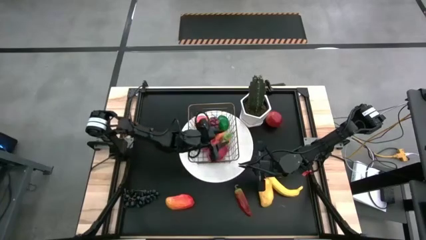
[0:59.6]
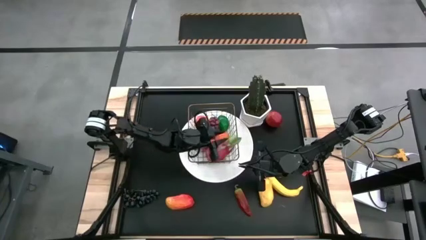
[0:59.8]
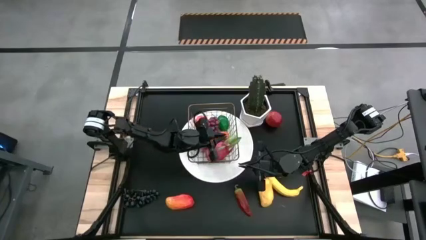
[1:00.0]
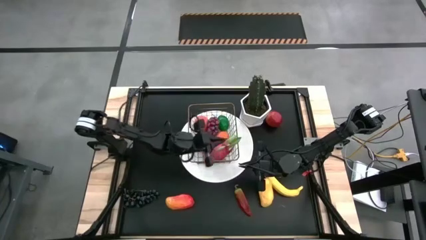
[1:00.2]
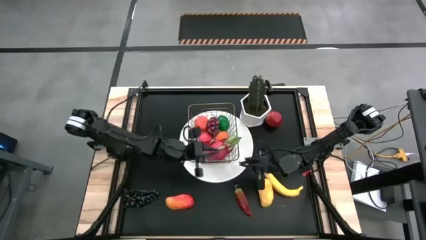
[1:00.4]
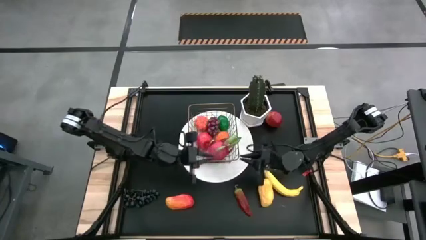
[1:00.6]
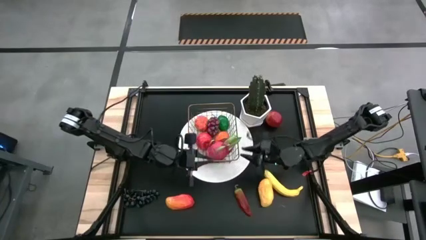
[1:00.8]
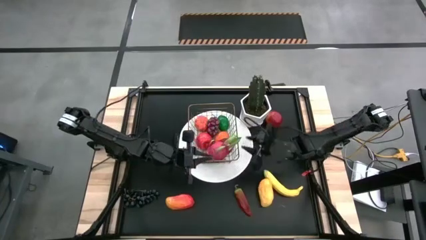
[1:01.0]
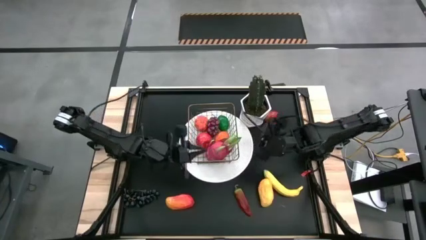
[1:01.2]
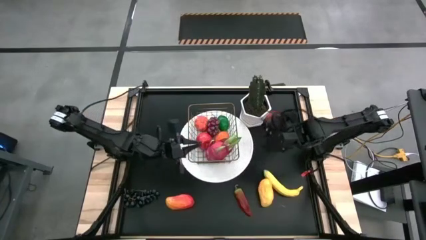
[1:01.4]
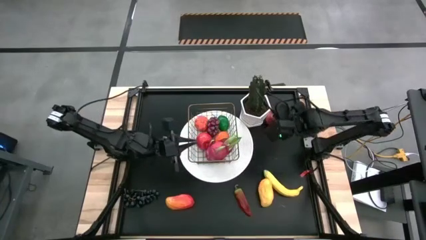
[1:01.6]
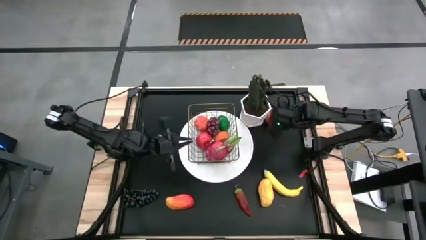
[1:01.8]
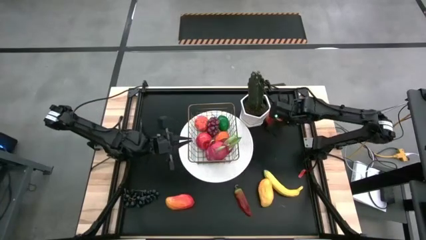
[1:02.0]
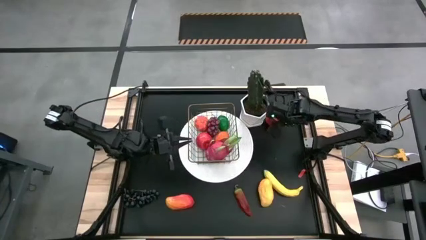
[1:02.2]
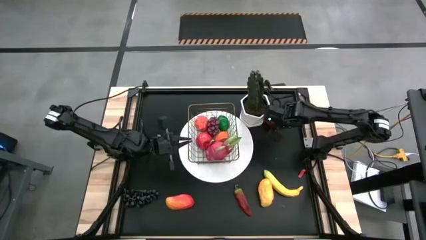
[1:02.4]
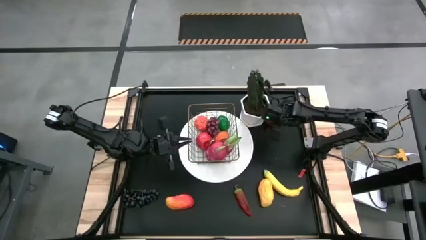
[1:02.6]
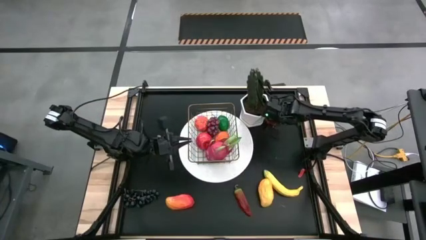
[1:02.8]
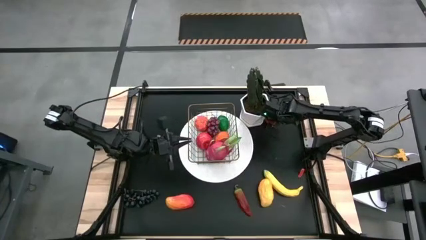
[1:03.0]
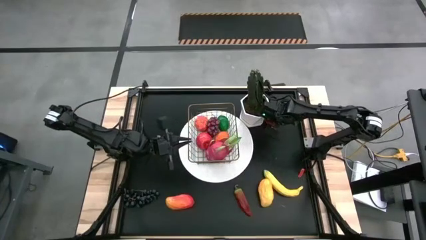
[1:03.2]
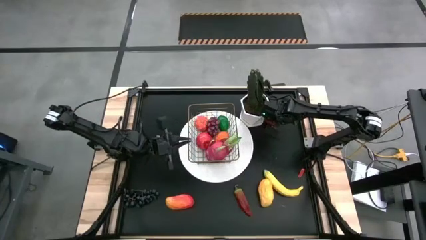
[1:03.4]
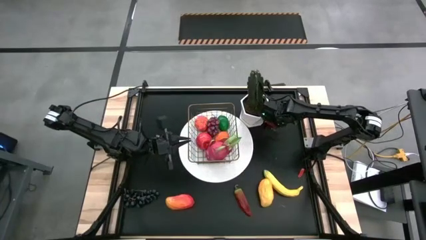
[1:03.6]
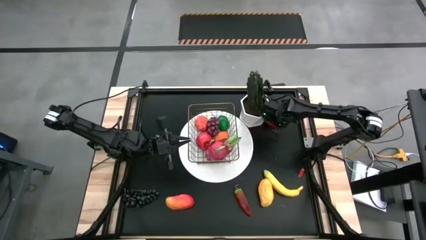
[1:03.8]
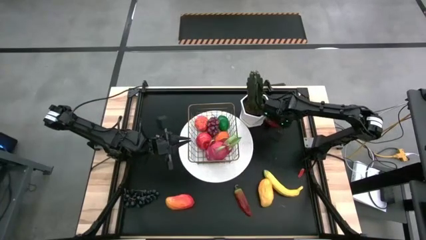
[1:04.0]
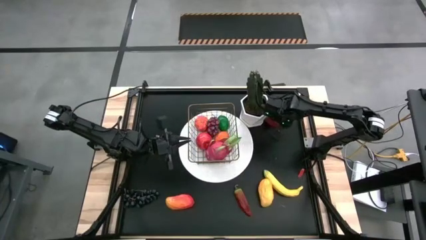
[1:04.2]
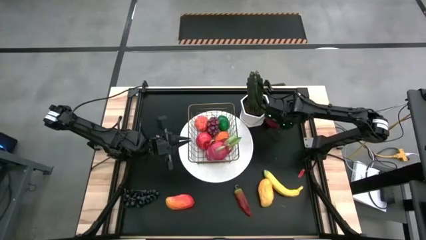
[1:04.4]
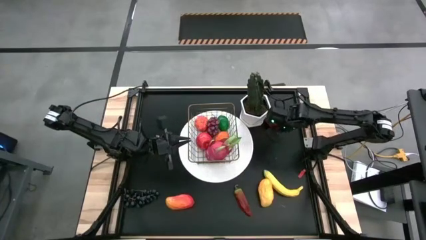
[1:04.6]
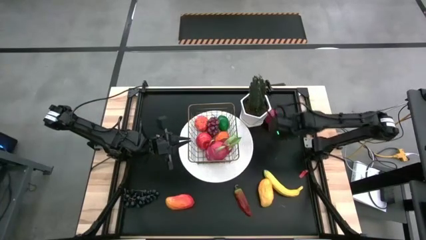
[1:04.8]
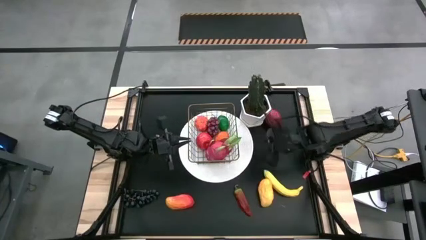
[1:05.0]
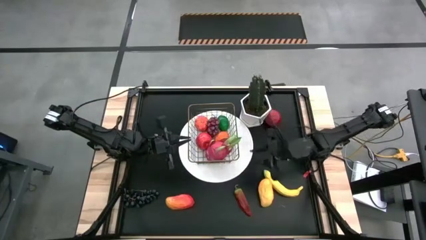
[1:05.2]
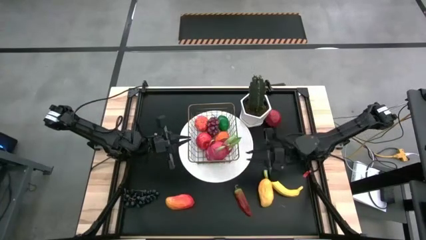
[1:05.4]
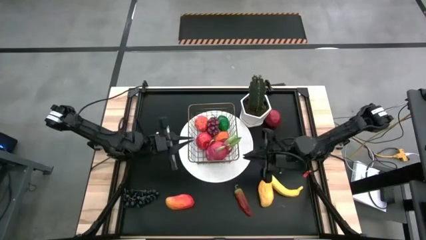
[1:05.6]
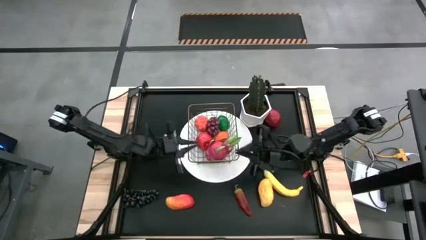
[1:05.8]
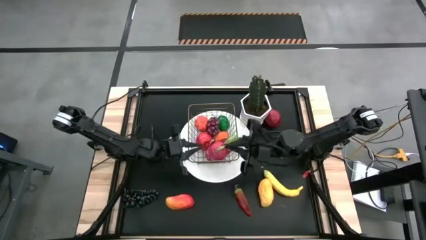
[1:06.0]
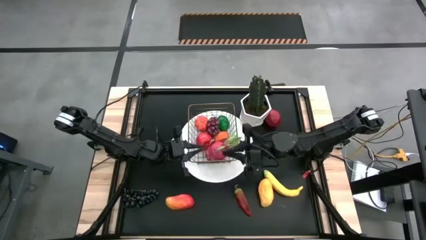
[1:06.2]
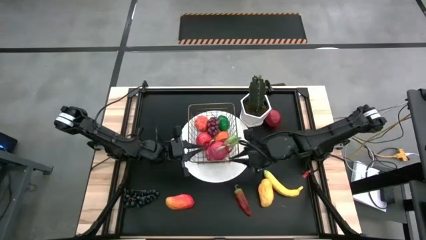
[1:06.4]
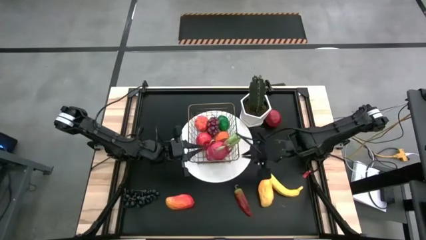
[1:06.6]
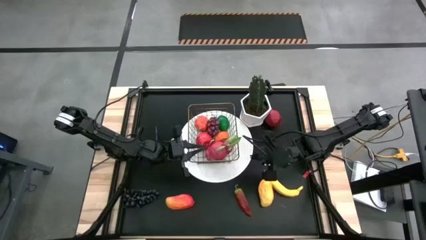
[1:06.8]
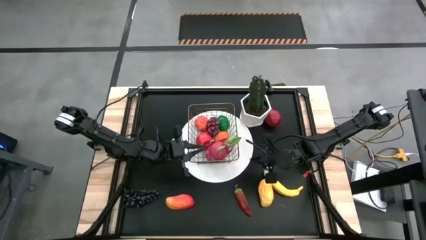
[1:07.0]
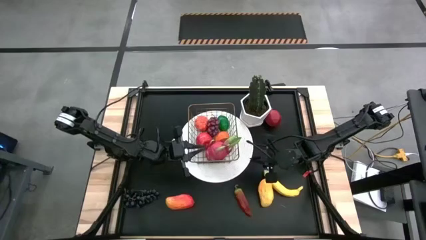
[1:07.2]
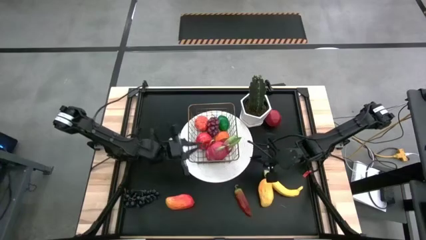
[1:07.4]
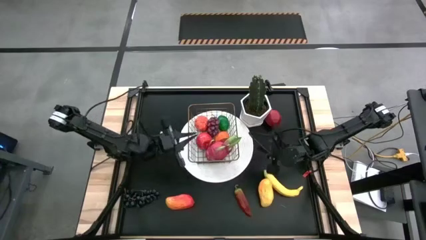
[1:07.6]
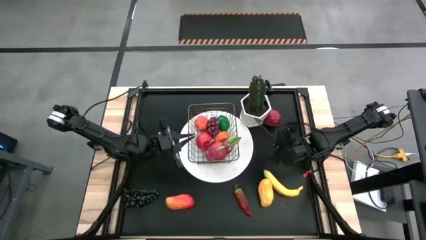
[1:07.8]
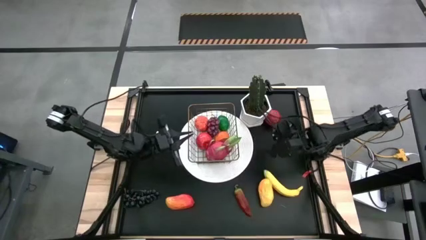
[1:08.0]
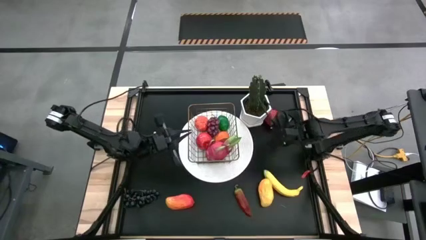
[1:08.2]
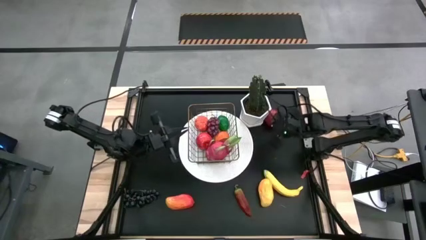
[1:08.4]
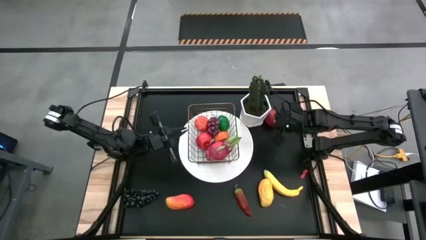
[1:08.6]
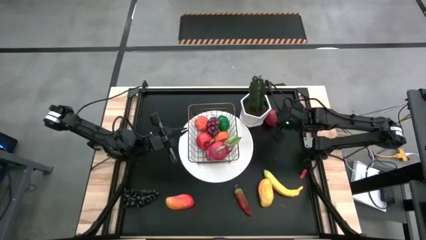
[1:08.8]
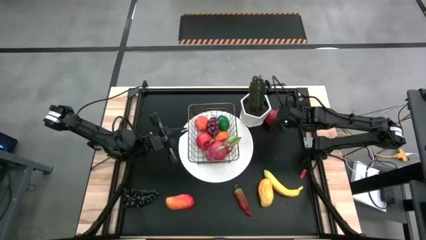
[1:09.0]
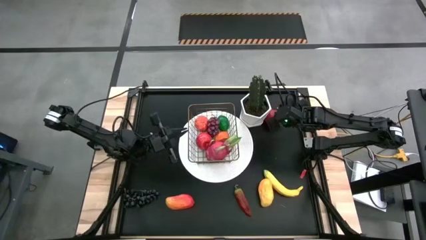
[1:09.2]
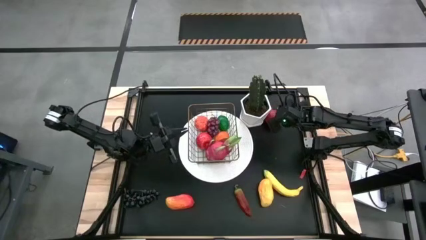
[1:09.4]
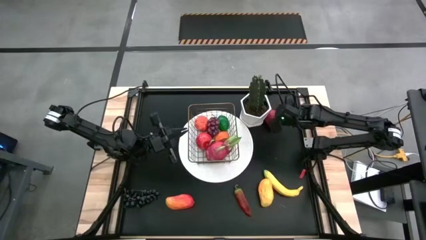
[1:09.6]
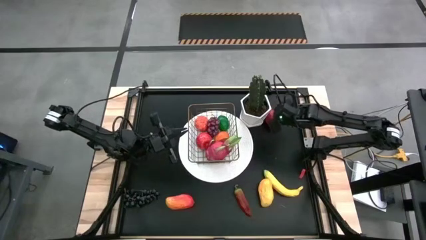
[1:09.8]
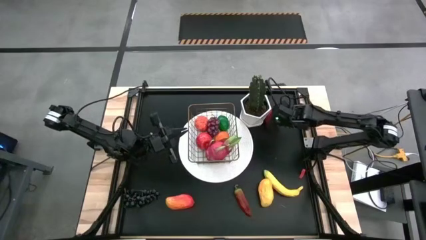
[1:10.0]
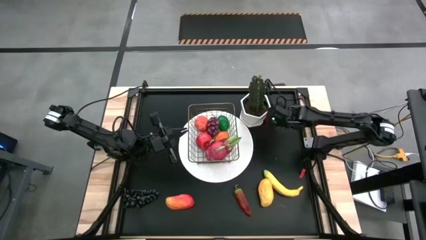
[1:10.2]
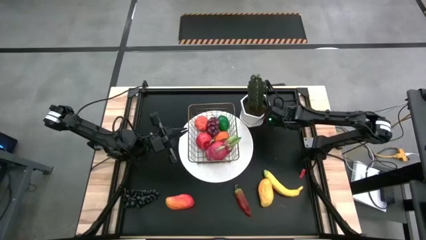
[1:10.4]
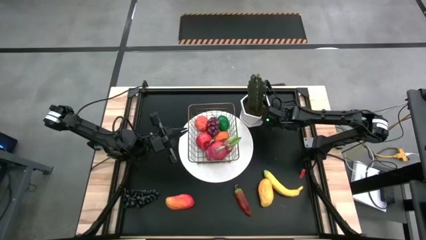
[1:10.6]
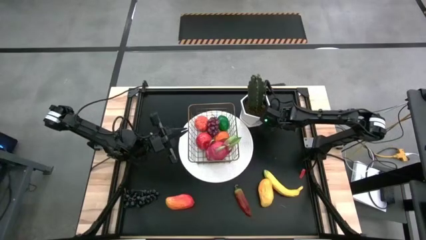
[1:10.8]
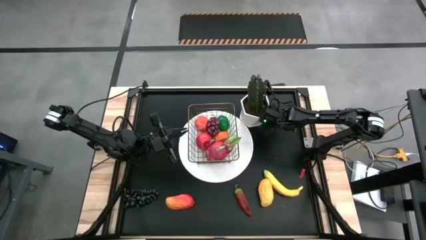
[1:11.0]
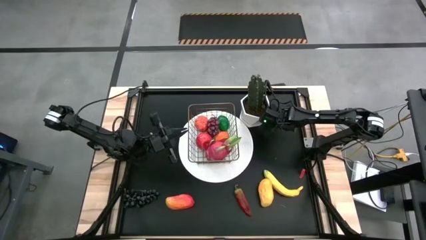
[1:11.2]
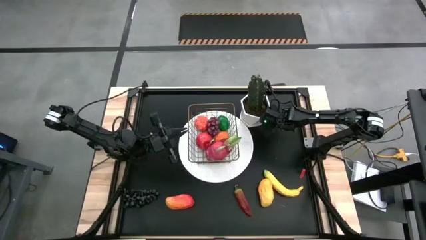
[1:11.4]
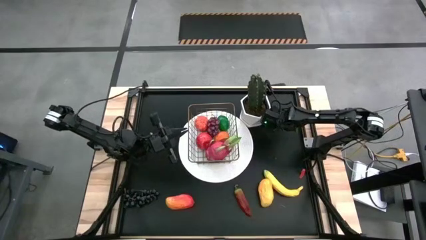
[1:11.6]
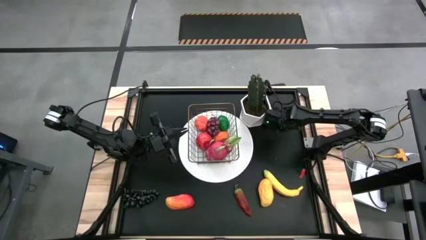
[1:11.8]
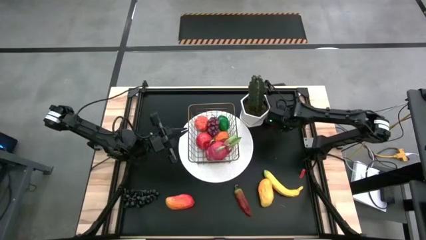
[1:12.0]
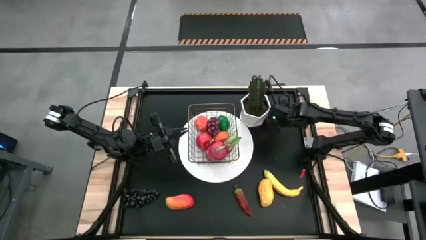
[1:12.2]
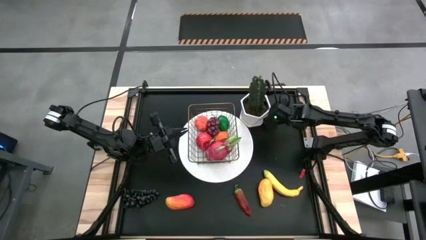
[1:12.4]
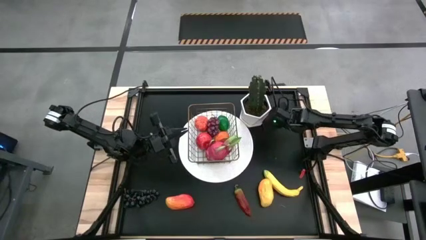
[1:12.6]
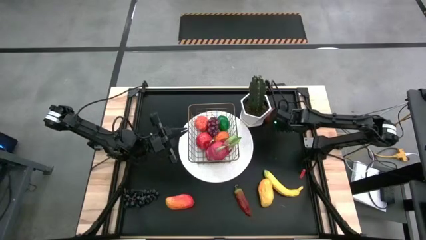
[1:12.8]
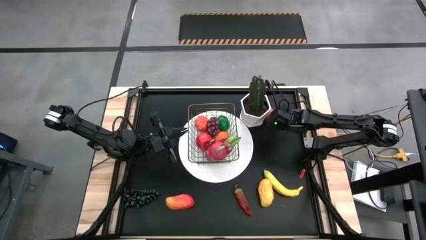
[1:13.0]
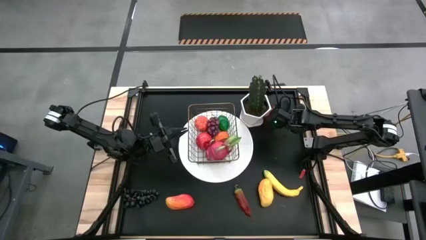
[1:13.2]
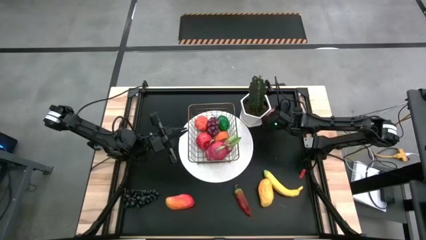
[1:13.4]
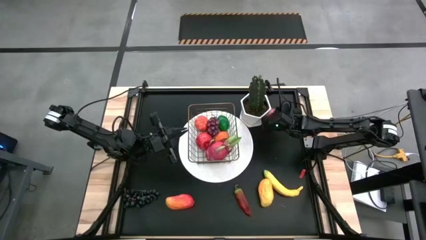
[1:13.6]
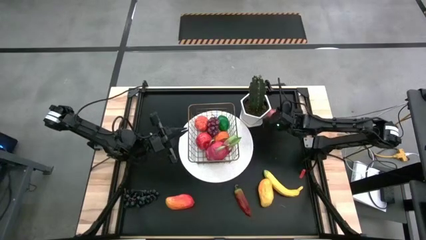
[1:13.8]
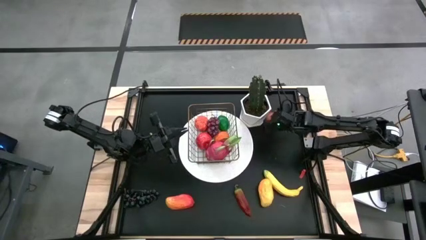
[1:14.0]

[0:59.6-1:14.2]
Task: Build produce basket
Put the pomegranate into the gold wire basket

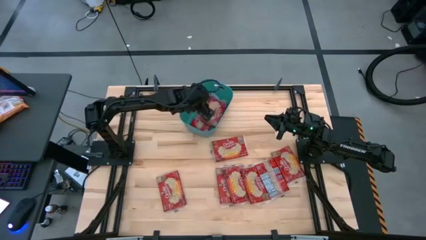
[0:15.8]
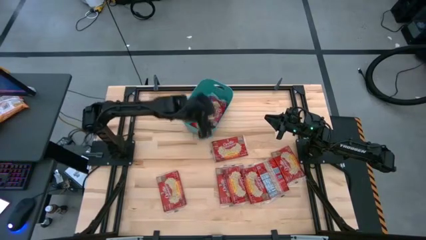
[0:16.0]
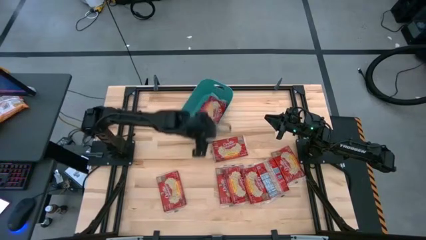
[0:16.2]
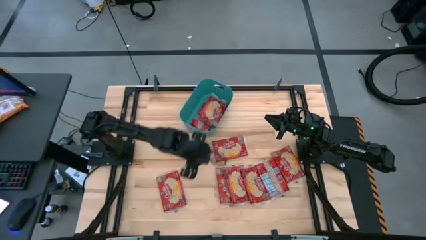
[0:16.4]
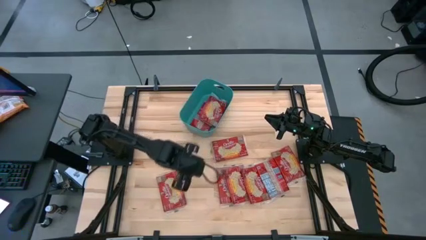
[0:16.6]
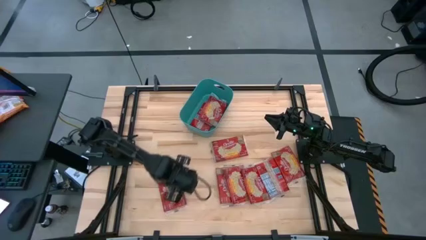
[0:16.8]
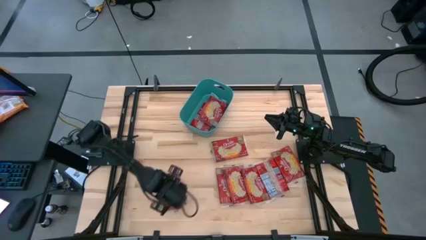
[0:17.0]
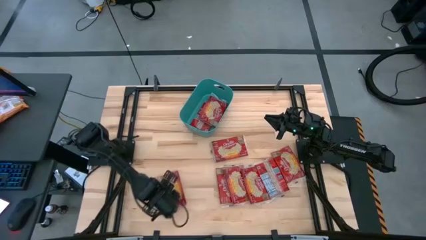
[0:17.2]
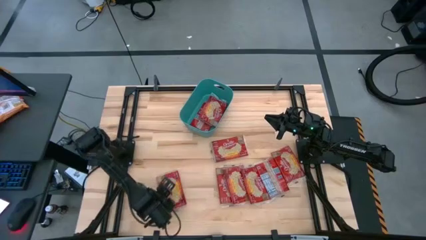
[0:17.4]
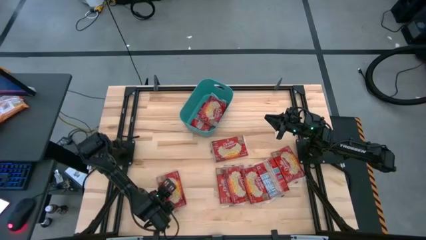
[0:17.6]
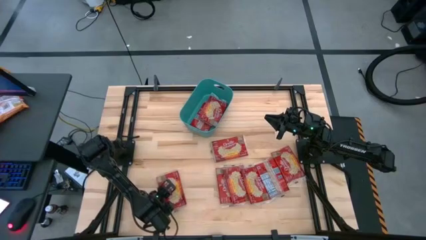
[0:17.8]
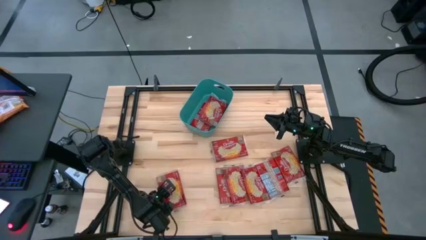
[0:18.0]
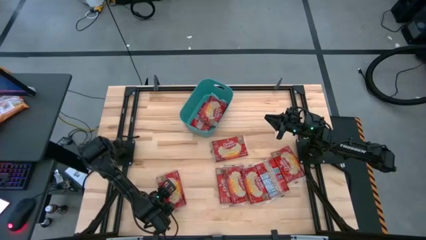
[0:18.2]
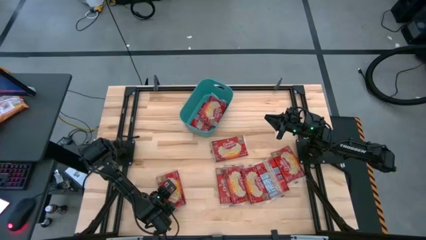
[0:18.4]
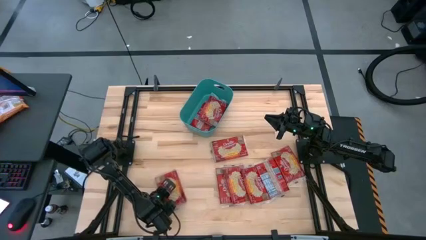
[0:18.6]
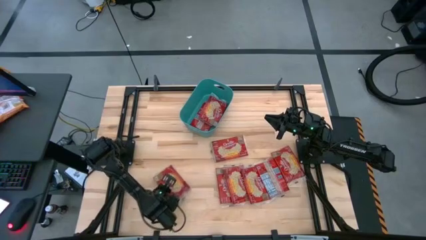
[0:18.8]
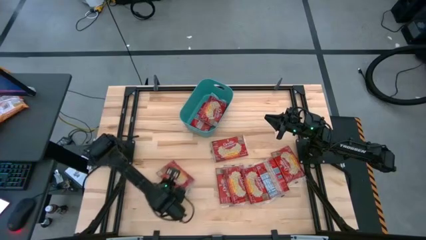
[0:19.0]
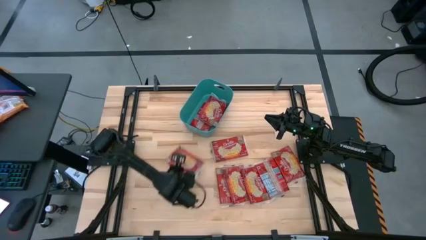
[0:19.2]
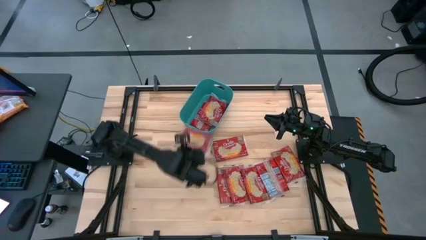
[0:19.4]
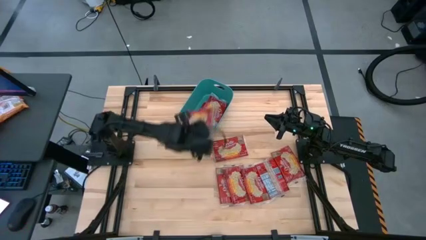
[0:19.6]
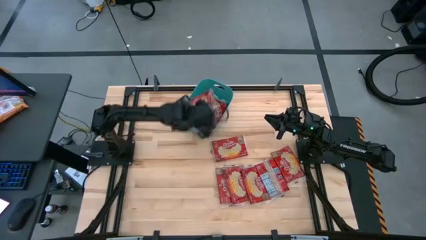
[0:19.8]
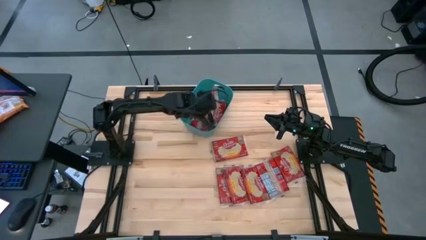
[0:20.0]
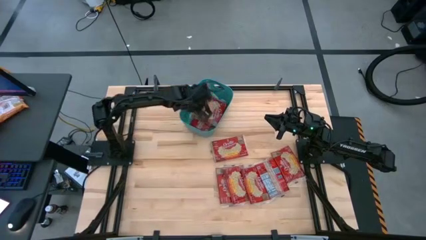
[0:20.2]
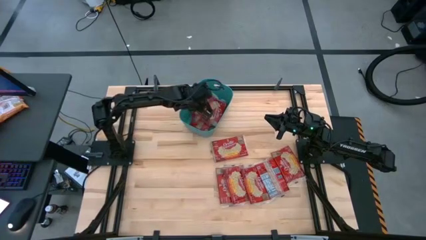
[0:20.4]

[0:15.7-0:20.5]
Task: Sort popcorn bags into baskets
Put the popcorn bag into the green bin
